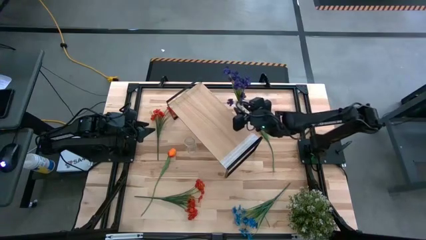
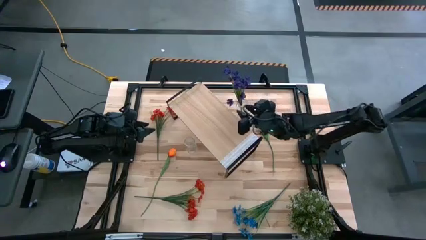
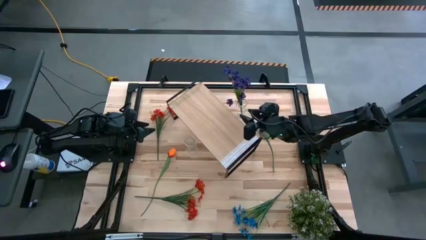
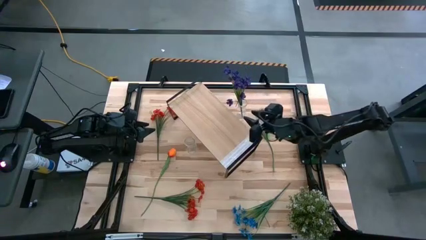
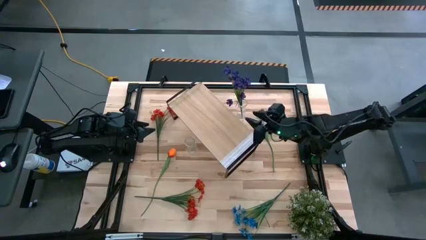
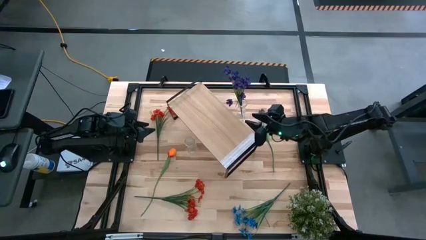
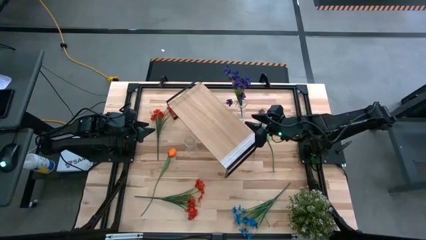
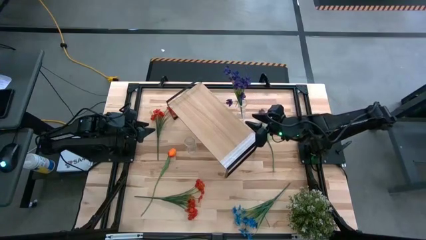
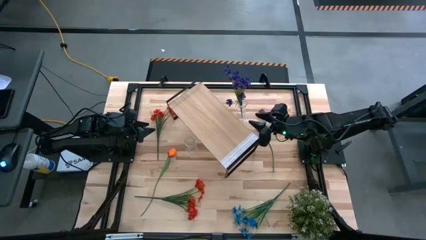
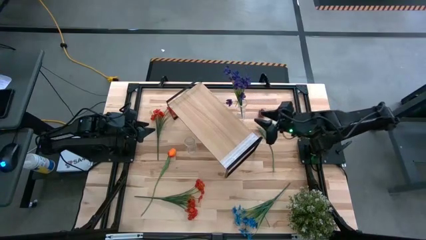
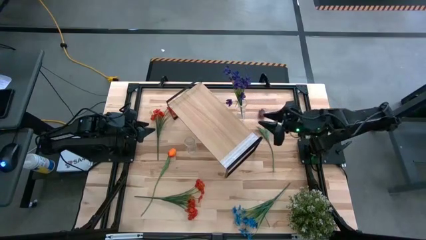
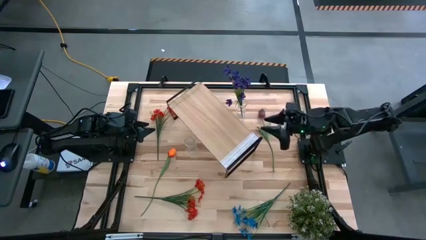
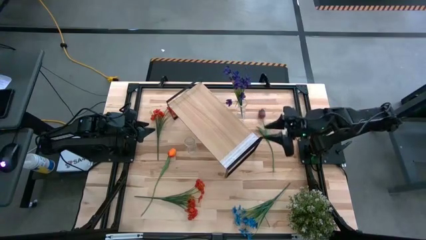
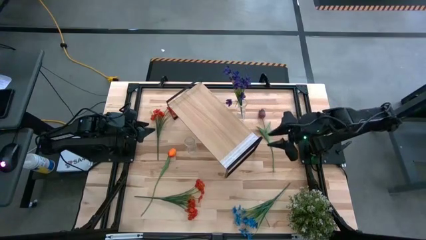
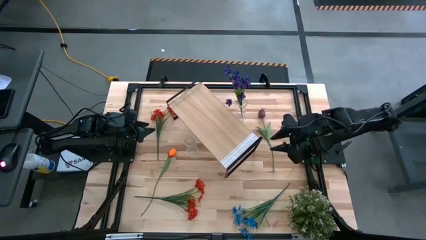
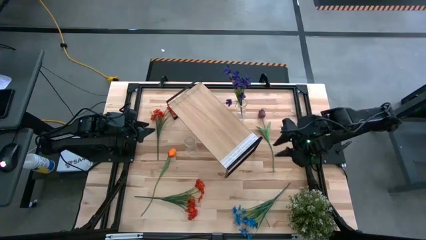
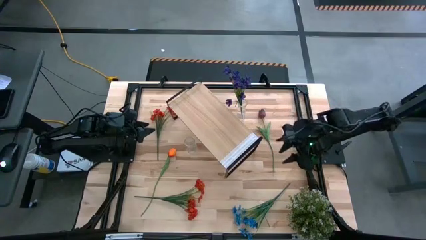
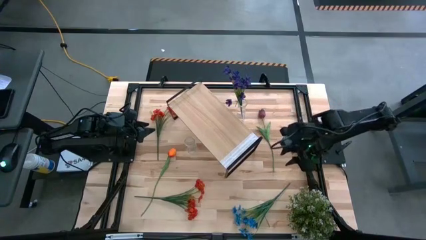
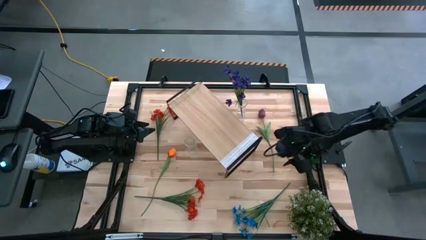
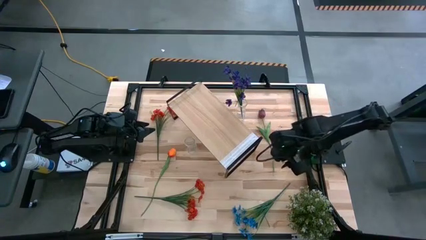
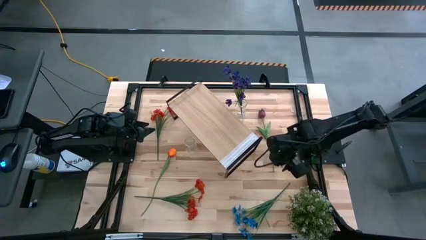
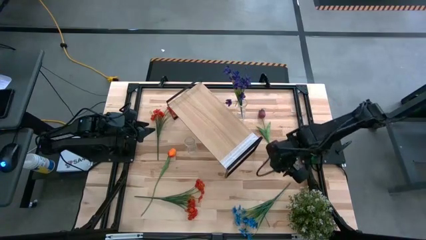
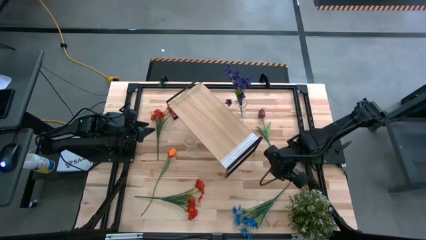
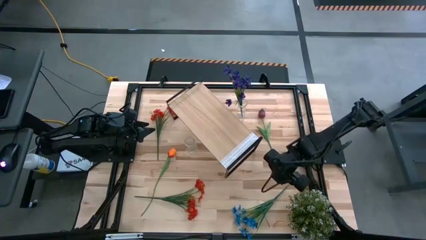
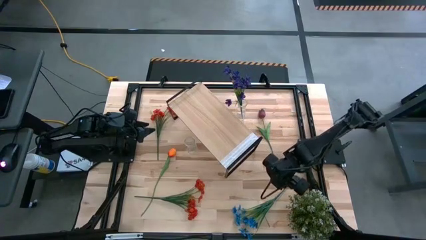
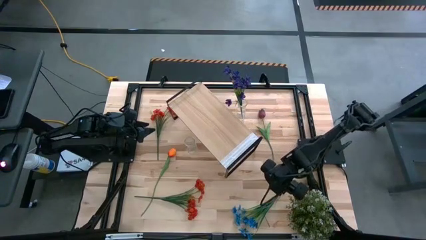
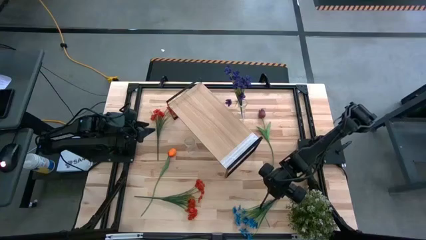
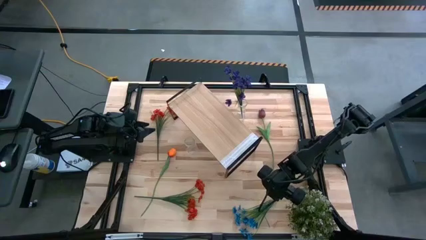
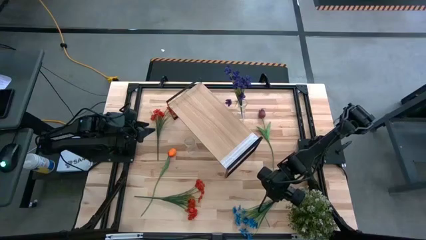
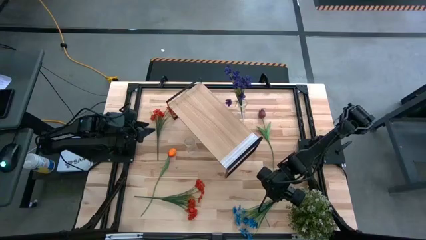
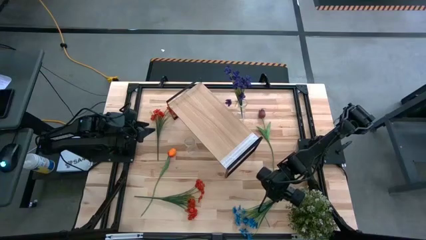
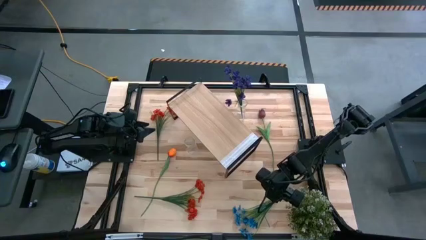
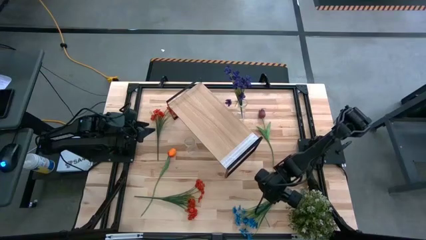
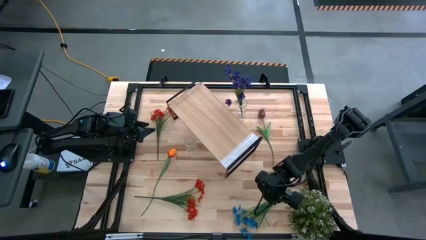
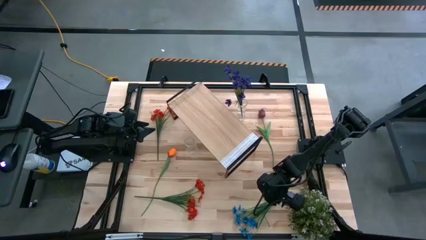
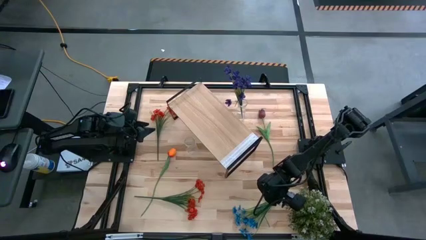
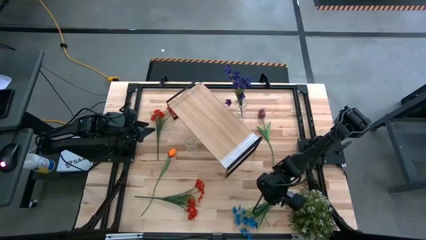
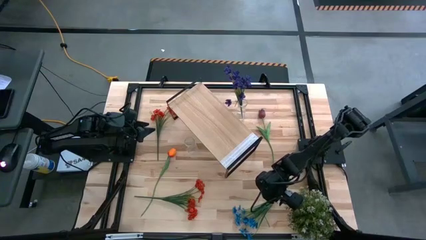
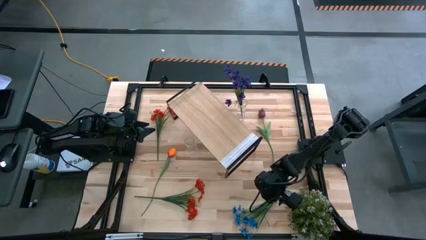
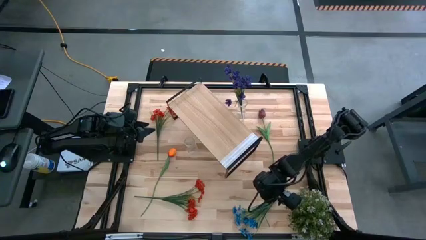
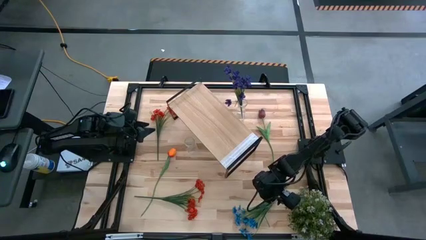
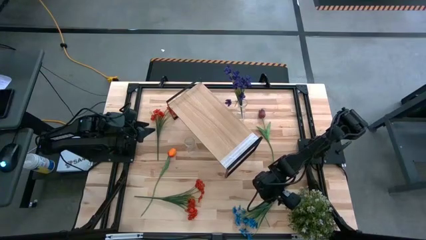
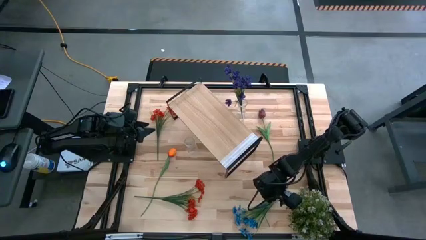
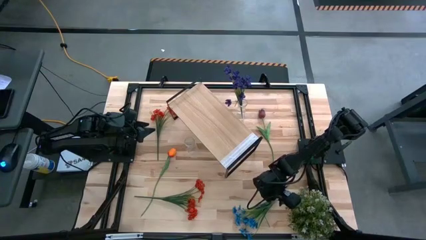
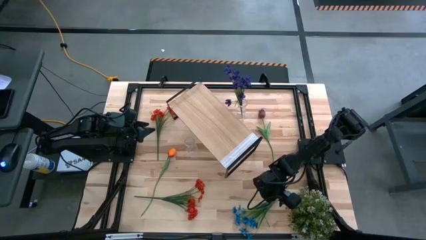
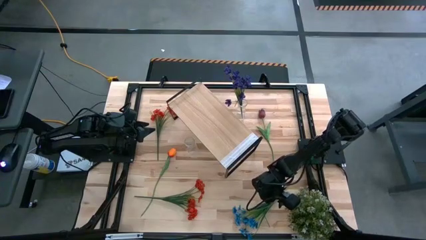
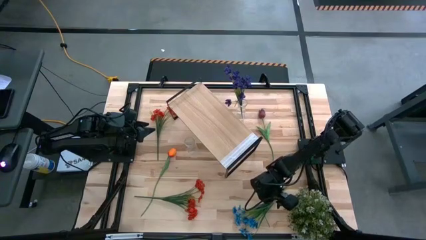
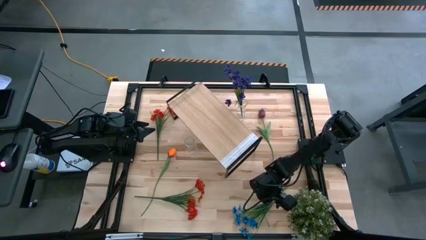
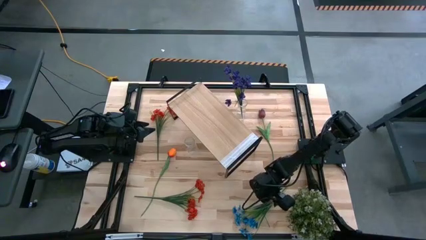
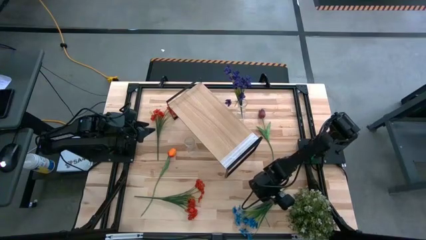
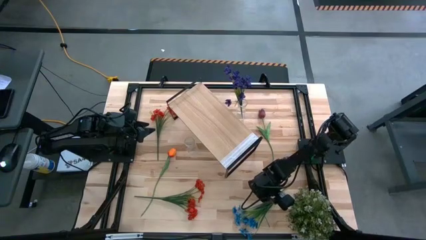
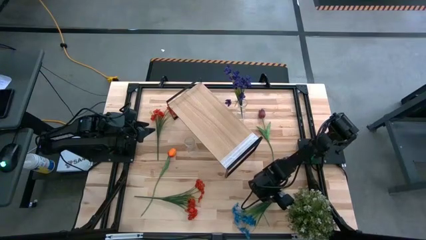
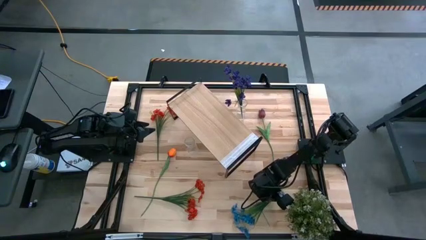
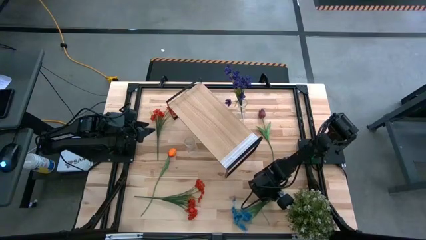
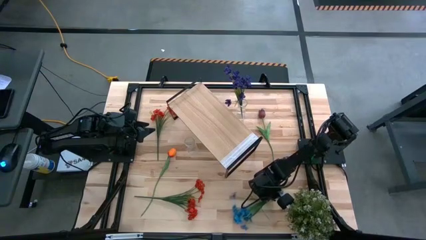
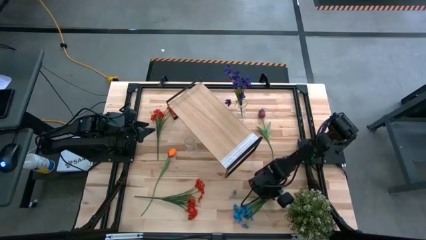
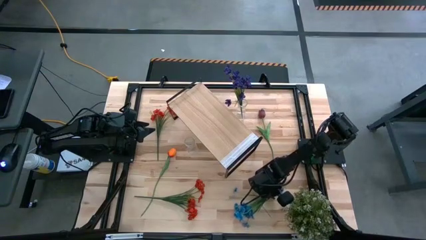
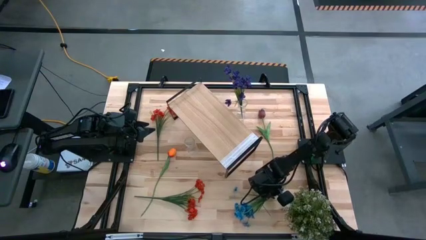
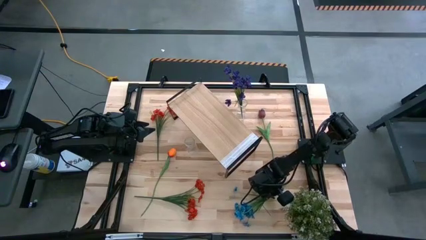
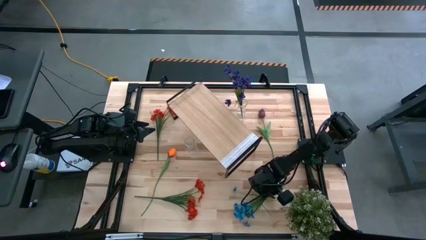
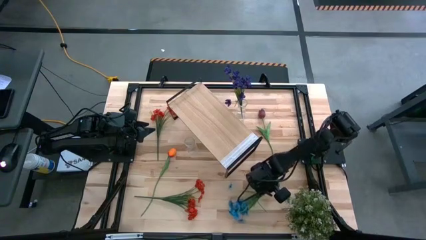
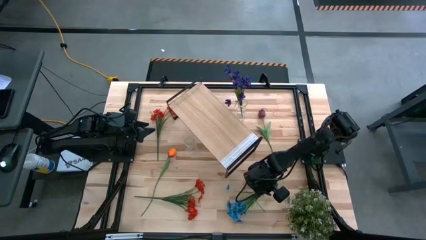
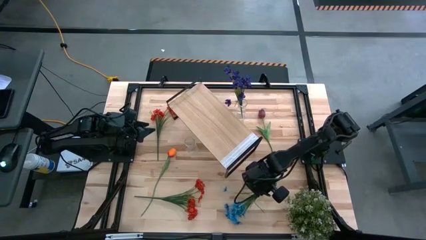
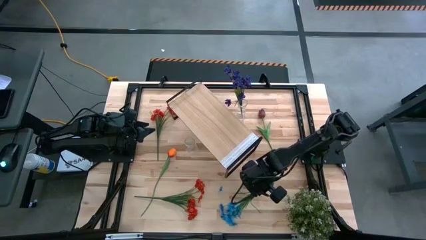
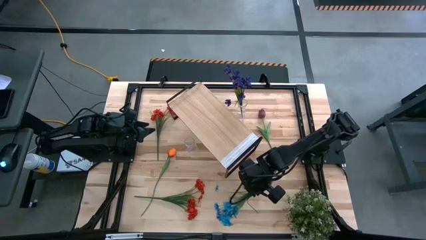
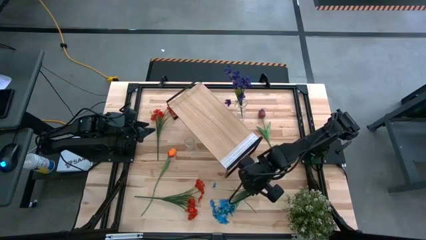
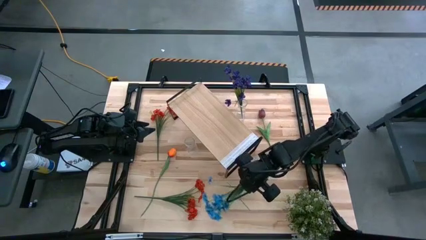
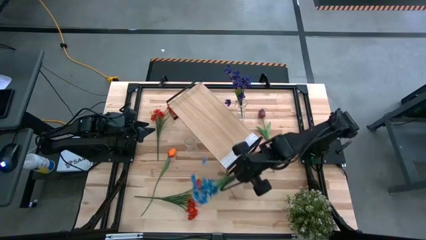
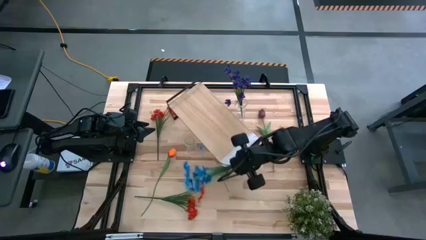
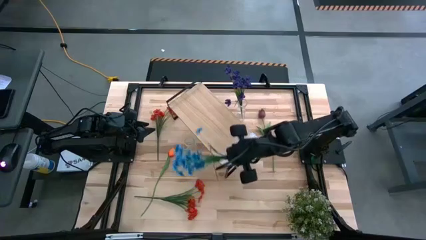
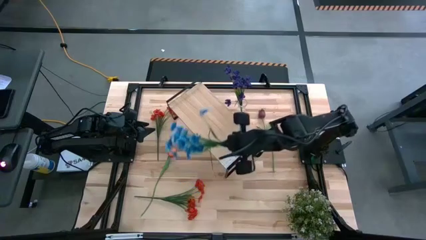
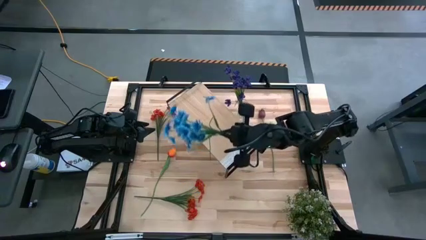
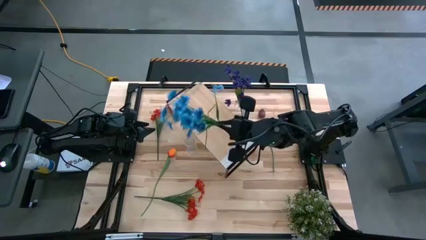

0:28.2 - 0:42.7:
Task: Pick and place flowers into a vace then onto a shelf
Put the blue flowers into the top transparent vase
